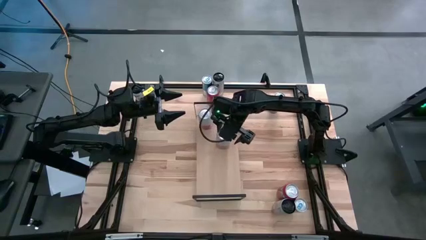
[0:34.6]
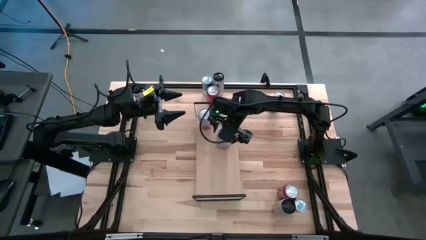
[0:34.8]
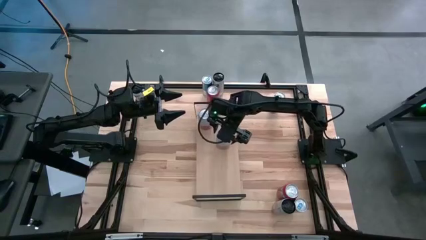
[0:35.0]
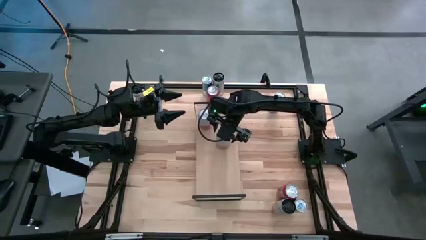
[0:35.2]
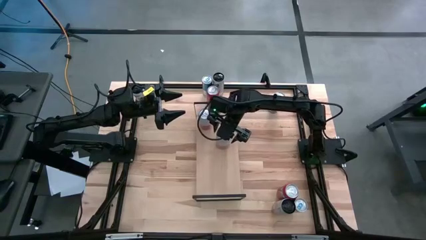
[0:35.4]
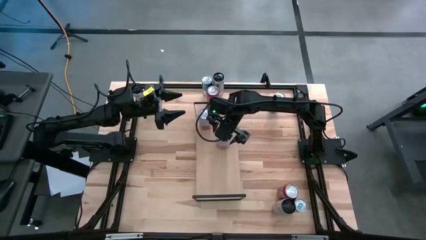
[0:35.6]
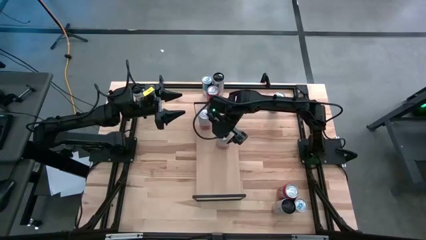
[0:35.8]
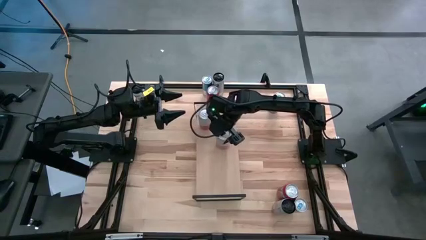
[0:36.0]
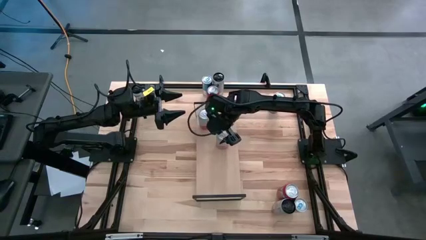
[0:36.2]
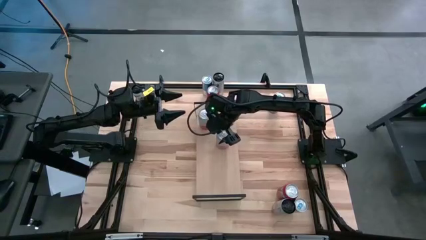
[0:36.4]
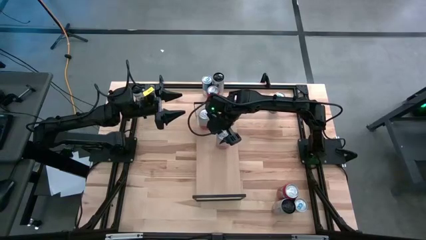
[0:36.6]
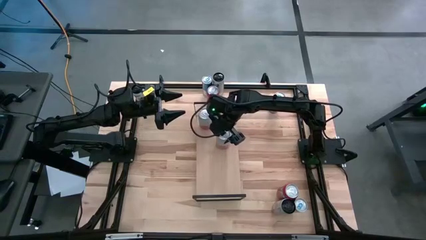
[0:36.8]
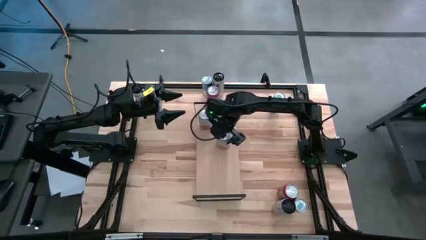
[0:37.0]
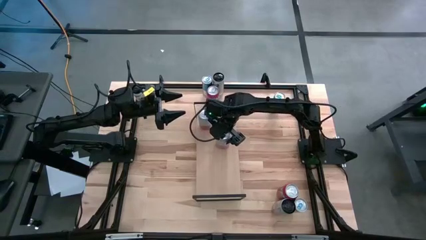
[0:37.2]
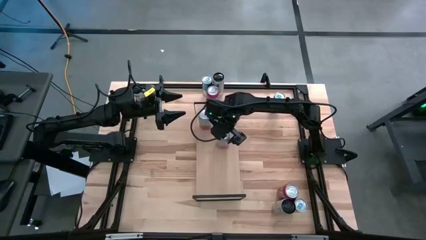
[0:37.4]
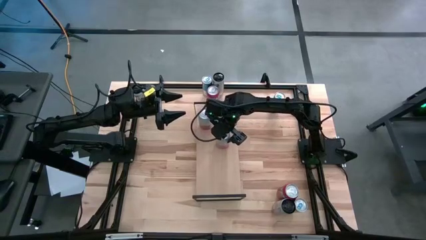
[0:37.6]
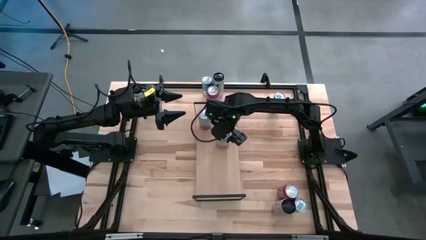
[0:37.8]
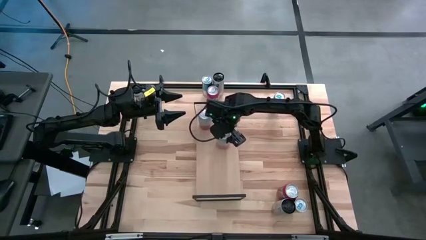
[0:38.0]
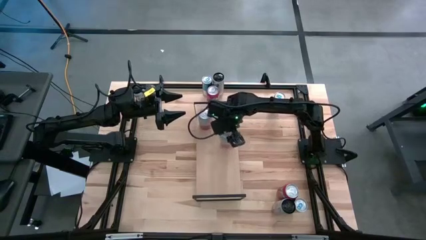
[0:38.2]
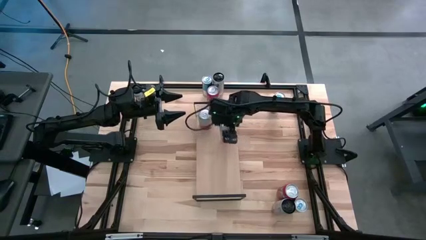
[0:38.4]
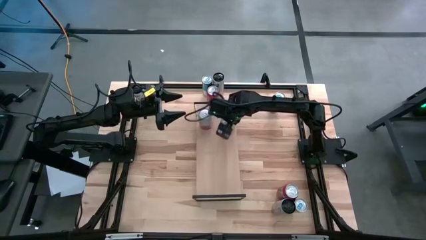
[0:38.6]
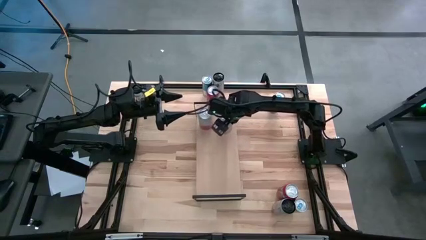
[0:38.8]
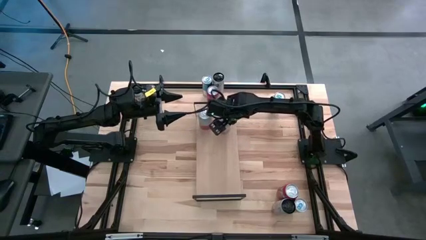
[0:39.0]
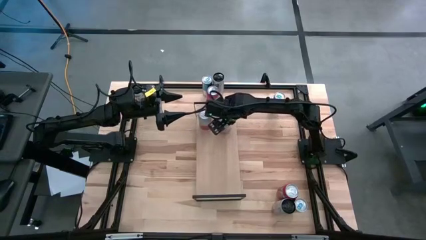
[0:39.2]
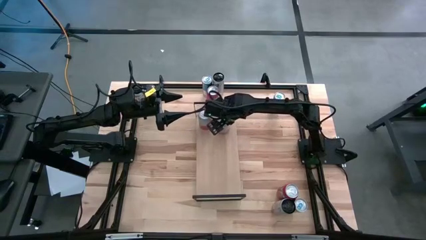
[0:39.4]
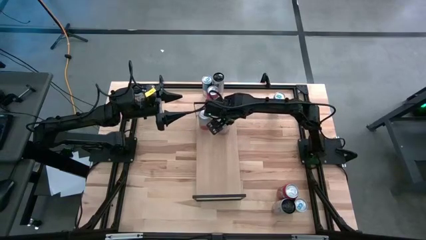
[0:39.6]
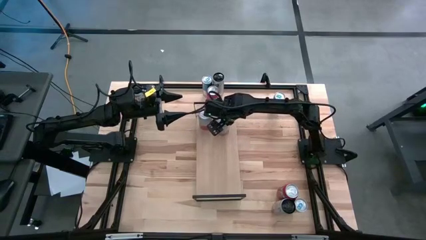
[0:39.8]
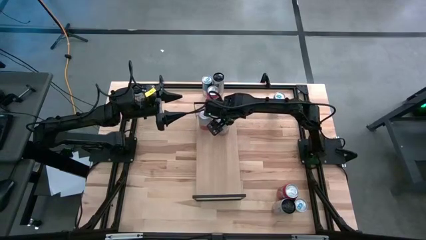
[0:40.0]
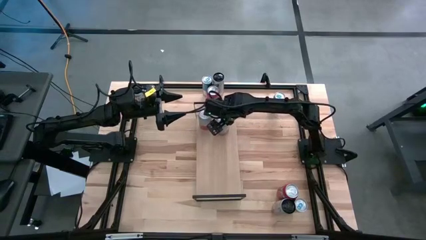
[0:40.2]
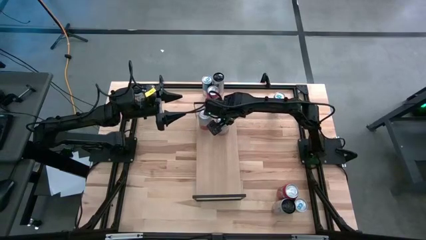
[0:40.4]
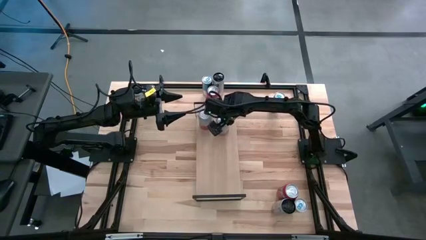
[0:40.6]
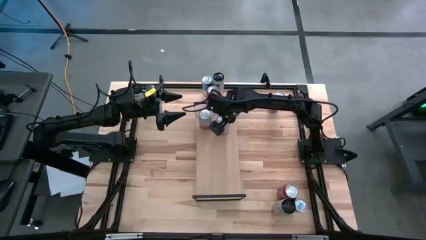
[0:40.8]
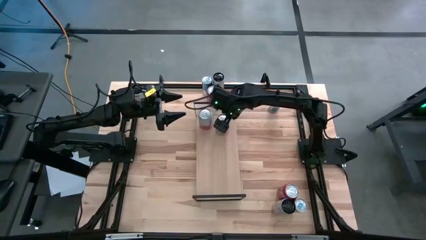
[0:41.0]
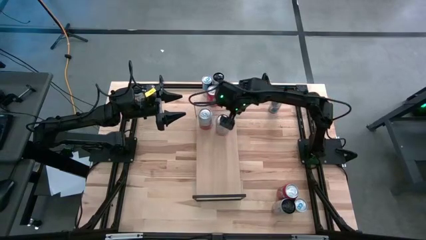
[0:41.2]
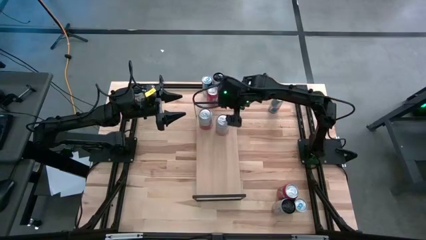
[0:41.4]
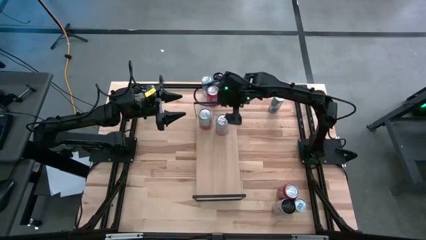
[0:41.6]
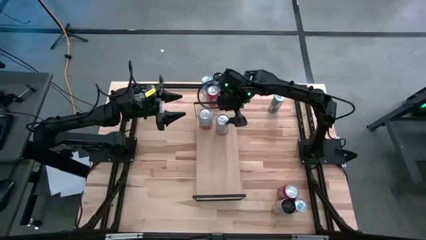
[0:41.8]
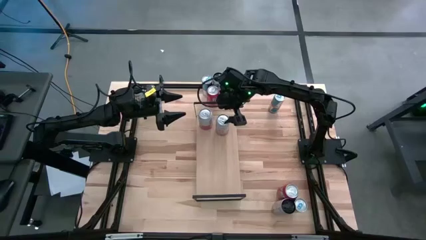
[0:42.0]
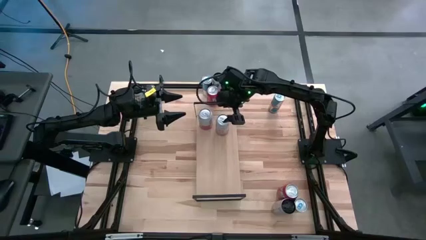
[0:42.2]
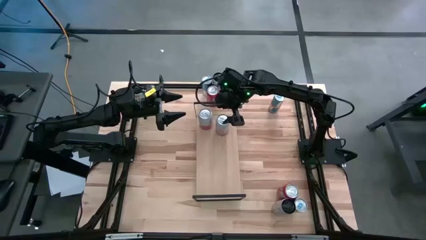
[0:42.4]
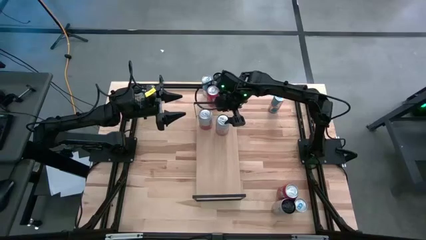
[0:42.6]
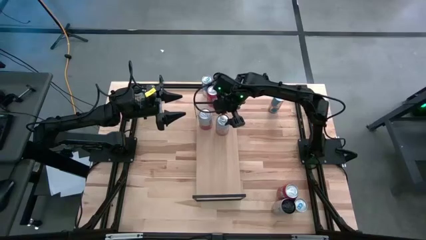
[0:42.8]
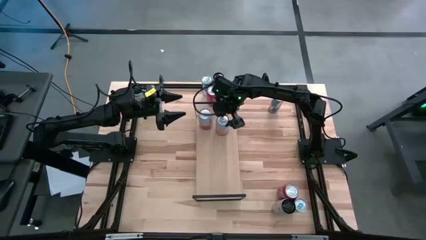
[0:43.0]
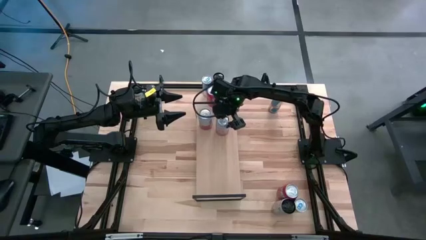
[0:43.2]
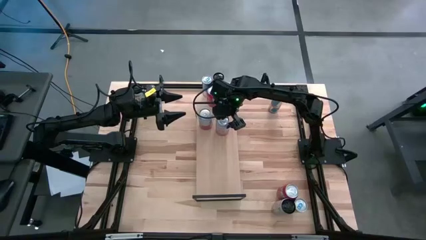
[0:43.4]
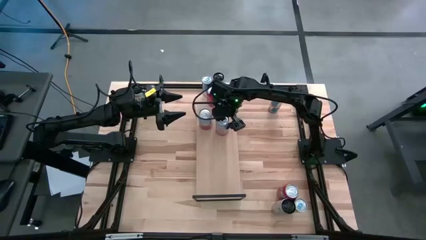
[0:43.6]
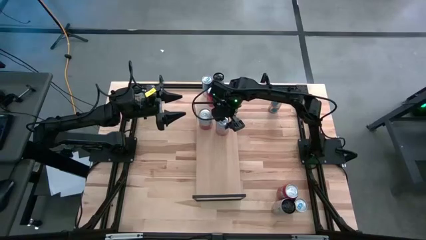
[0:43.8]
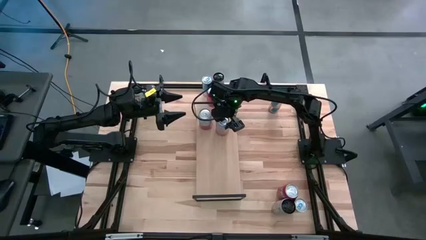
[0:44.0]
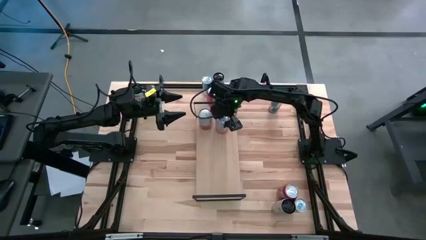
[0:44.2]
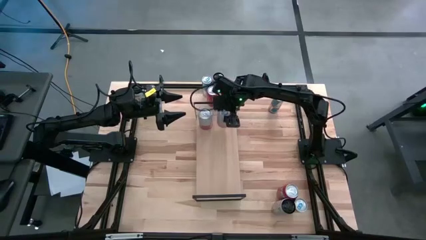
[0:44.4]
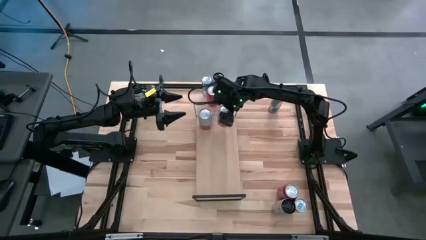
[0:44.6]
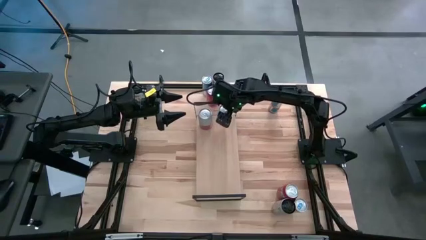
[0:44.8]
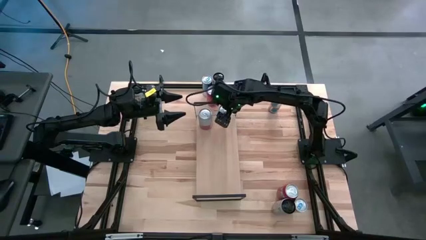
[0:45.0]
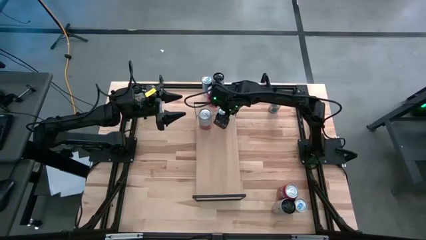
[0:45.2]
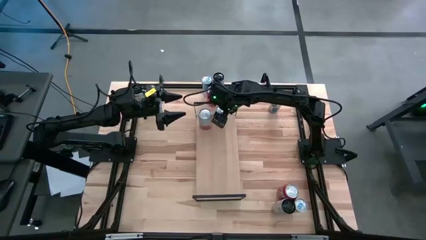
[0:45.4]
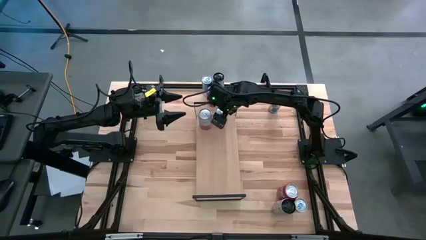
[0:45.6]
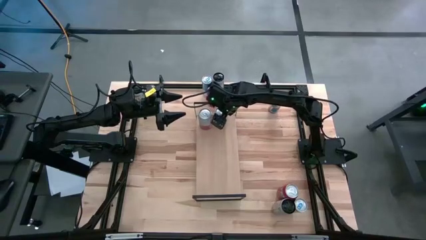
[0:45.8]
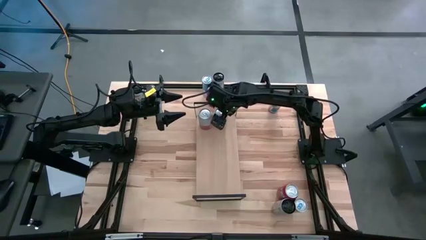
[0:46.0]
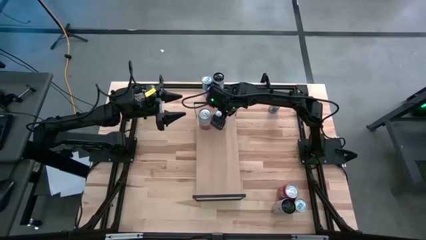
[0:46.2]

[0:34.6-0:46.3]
Task: Place canned beverage on shelf
Put the pink white soda can on the shelf aligned with the other pink white soda can
